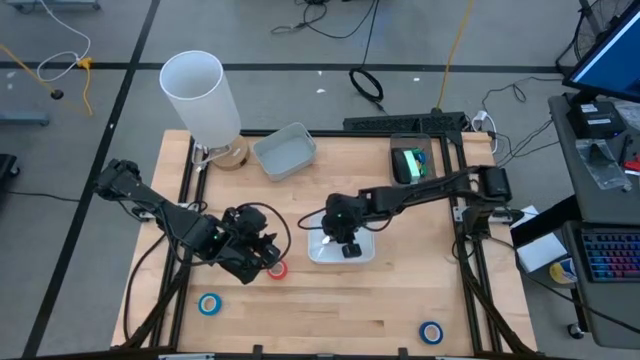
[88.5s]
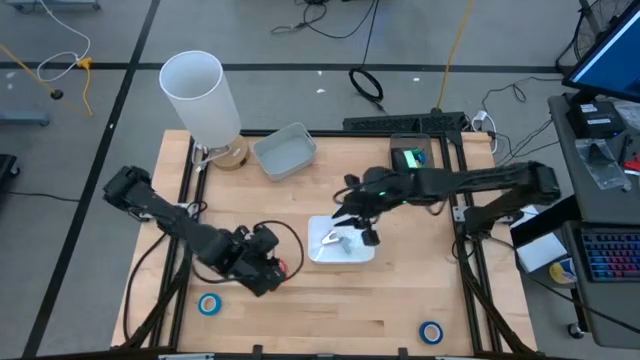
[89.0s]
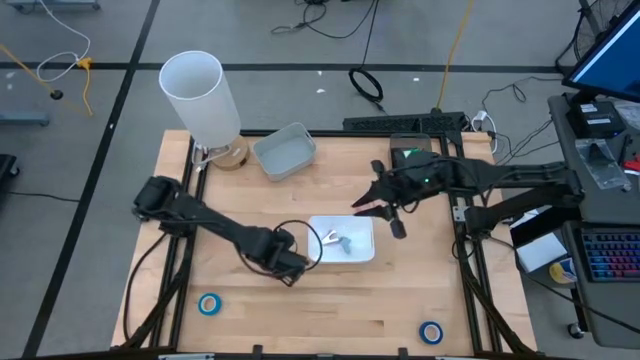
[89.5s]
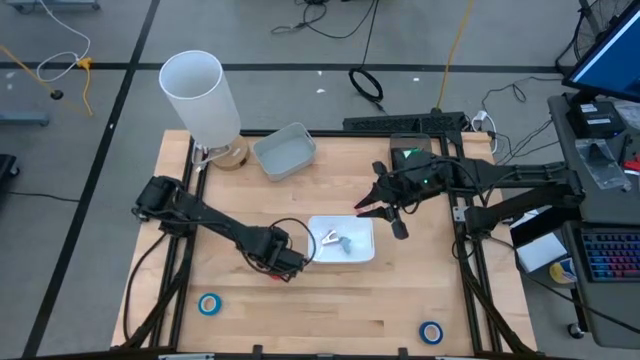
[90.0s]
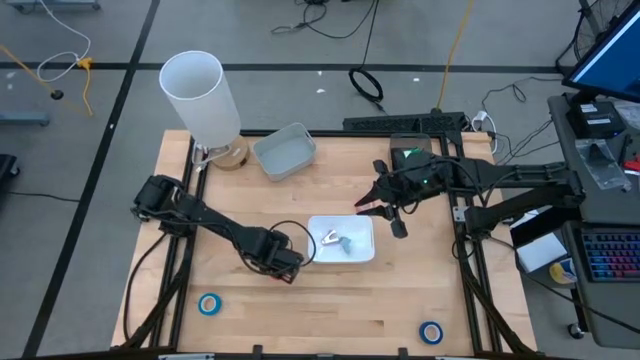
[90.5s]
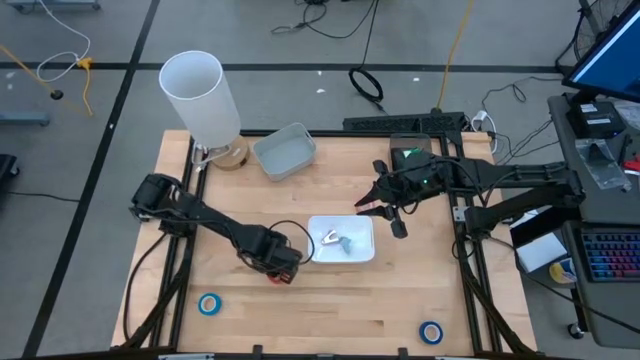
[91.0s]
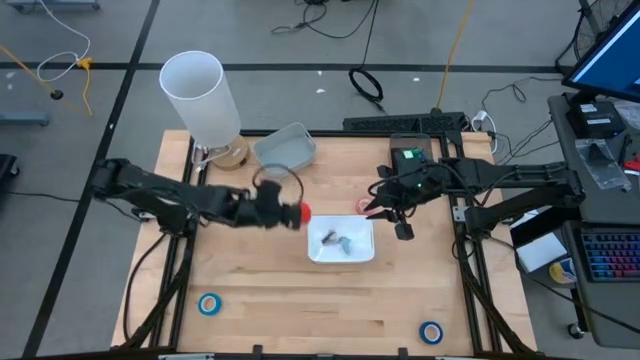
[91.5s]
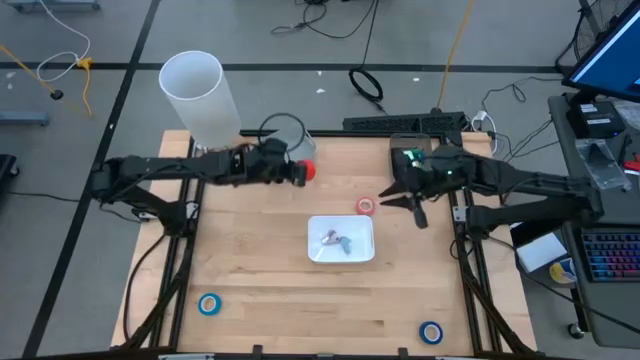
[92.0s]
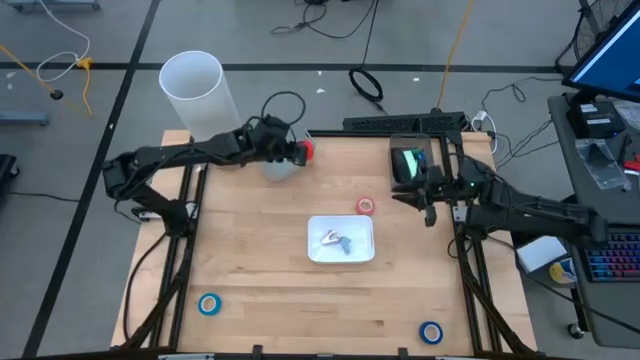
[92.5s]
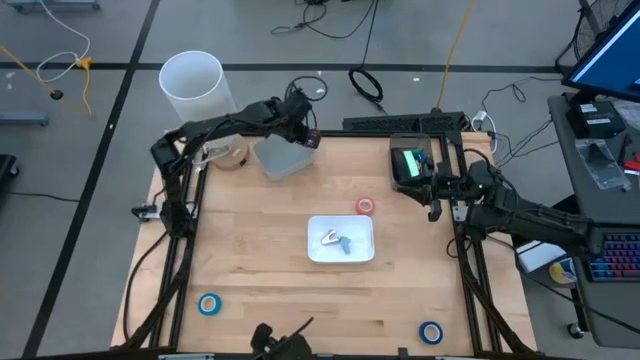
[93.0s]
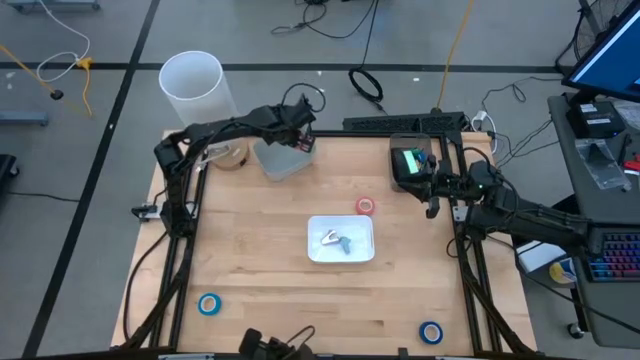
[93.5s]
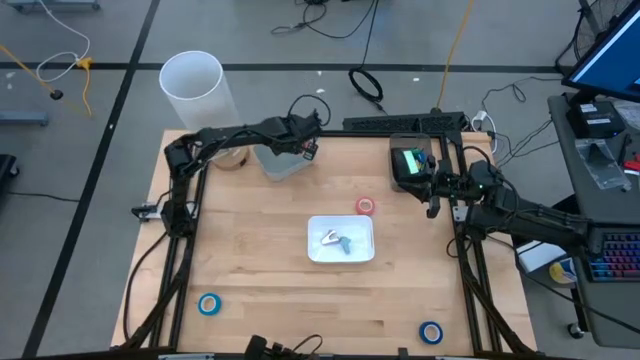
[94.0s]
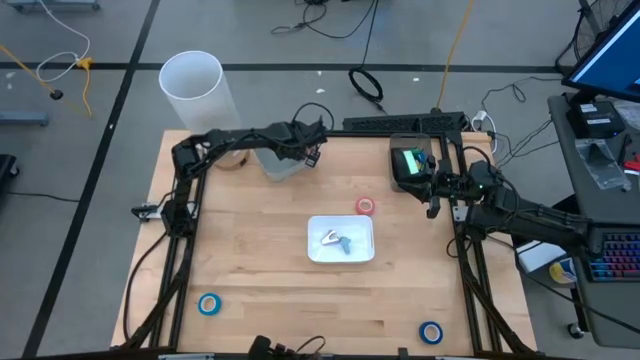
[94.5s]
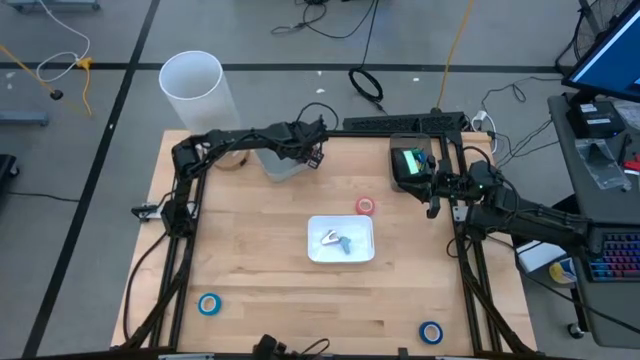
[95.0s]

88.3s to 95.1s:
Task: Pick and place Stapler, Stapler remover, tape
Put the orange tape into the gray bin

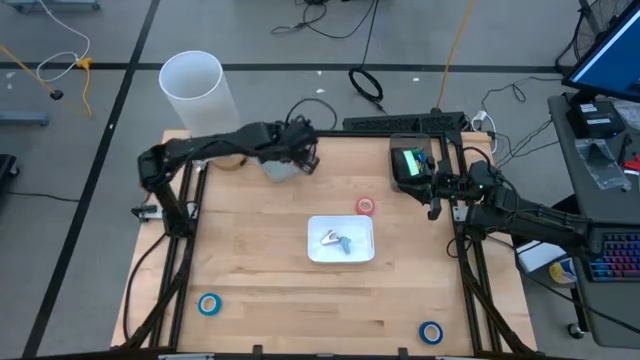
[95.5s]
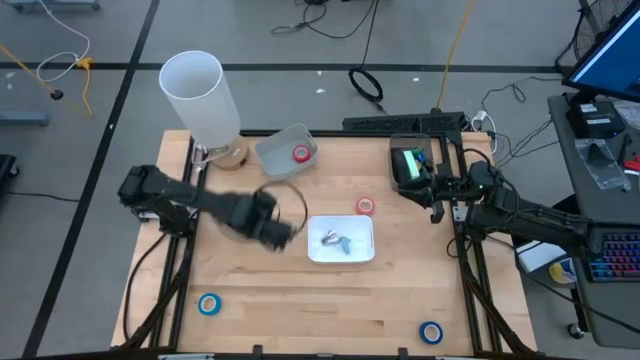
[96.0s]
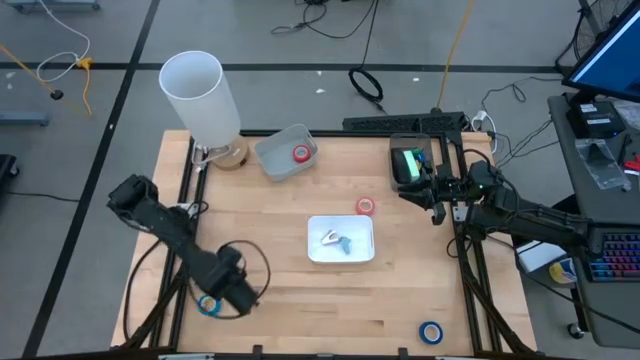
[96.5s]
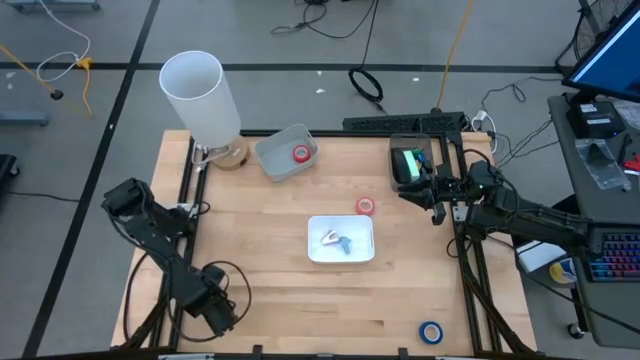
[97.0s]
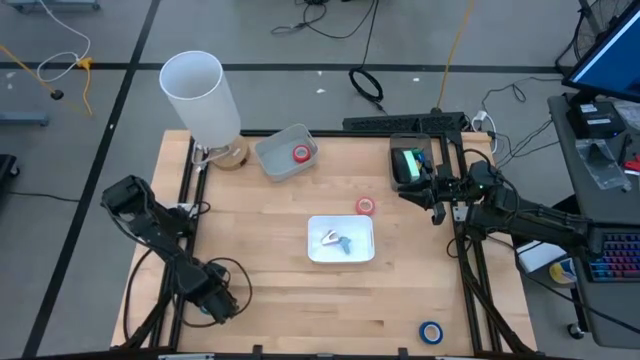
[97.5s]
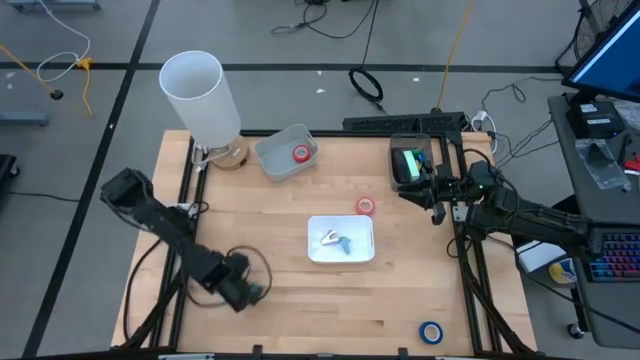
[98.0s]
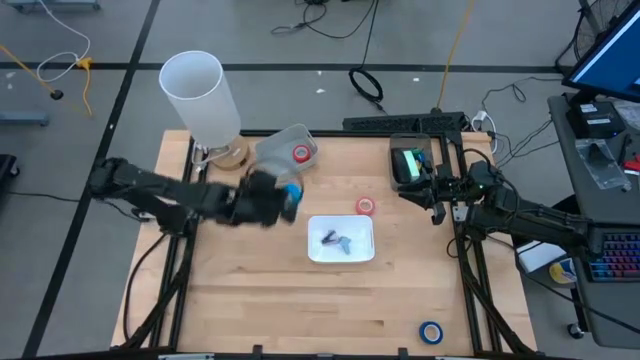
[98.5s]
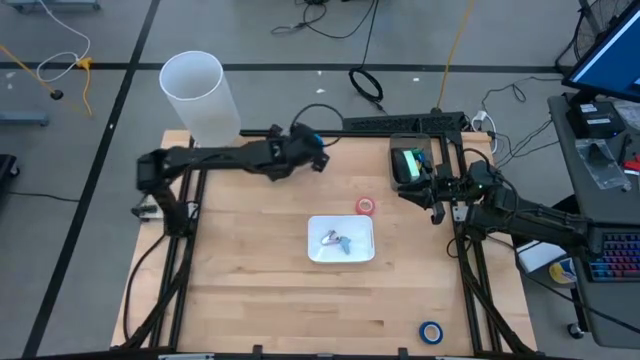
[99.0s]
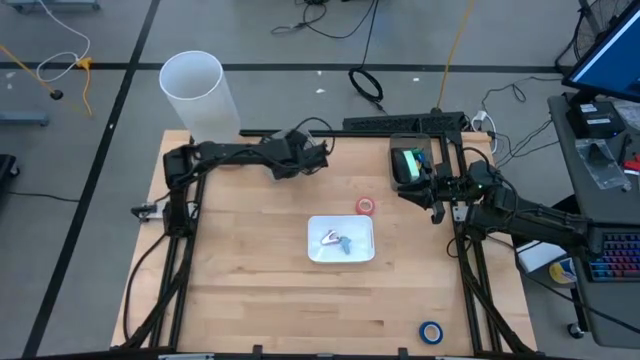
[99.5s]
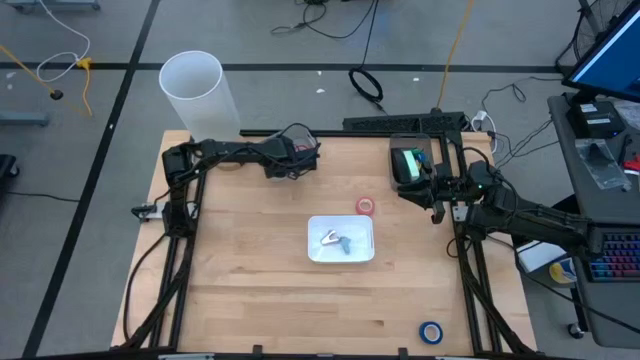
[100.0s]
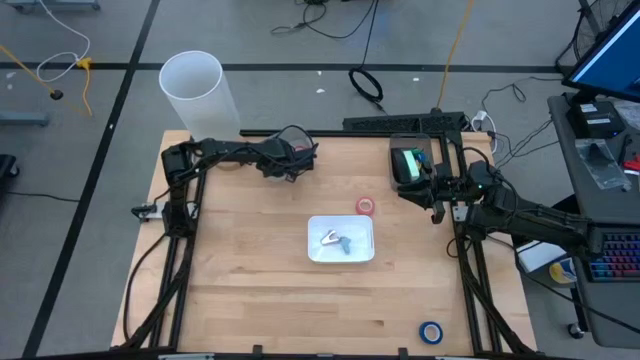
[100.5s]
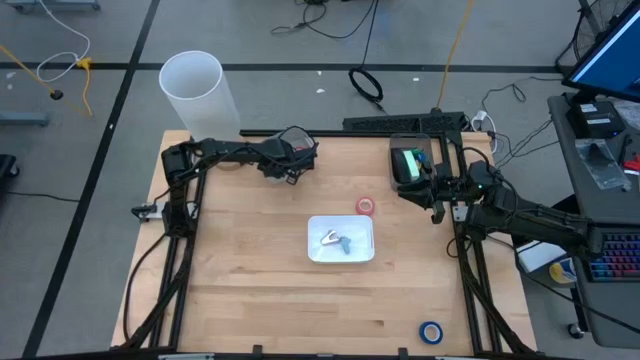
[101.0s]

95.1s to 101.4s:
Put the light blue tape into the gray bin

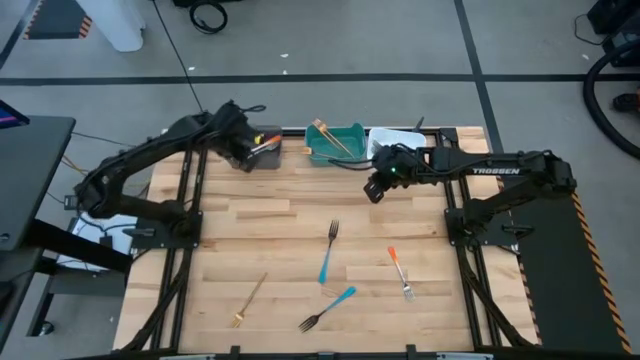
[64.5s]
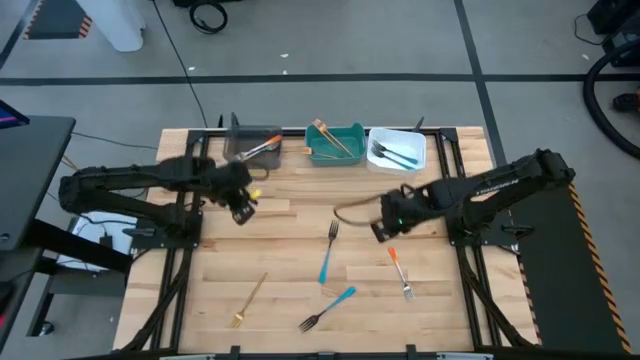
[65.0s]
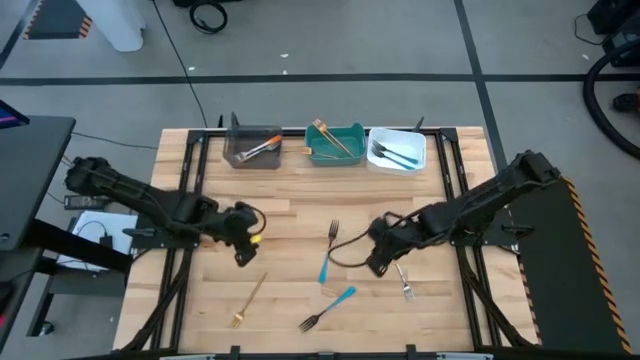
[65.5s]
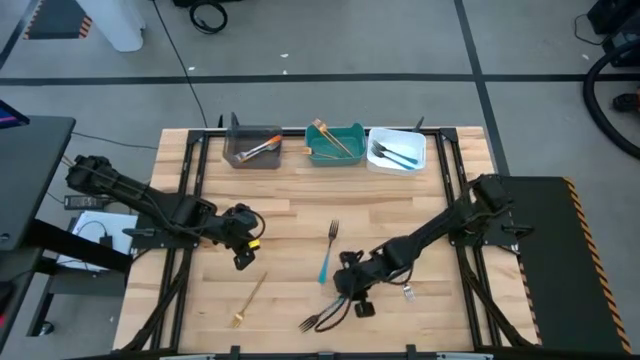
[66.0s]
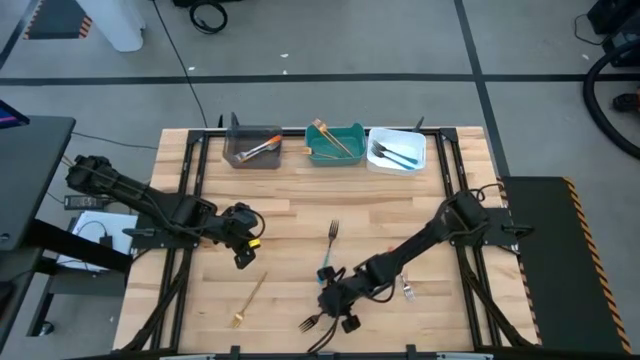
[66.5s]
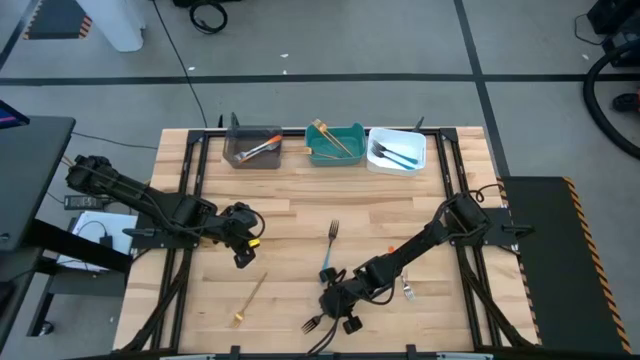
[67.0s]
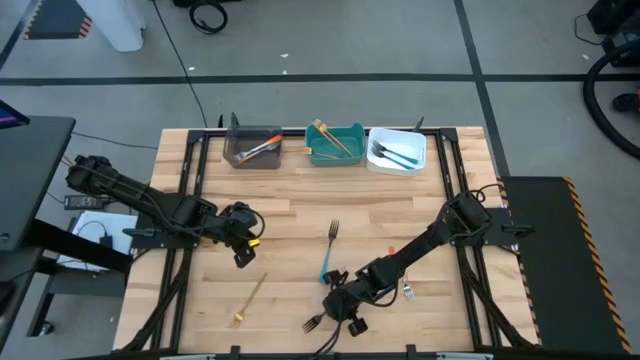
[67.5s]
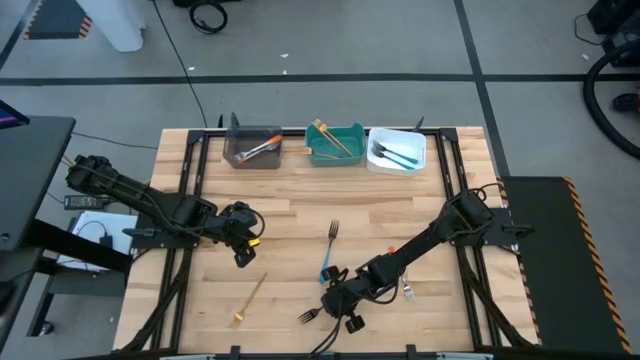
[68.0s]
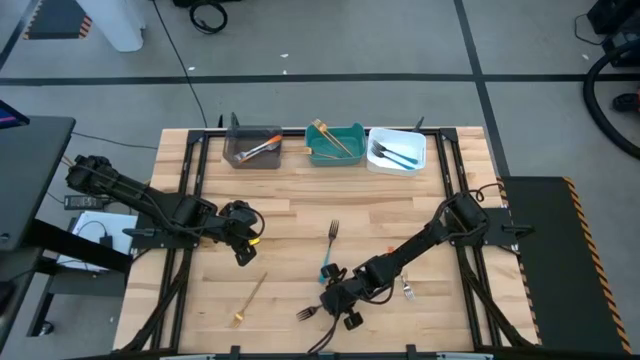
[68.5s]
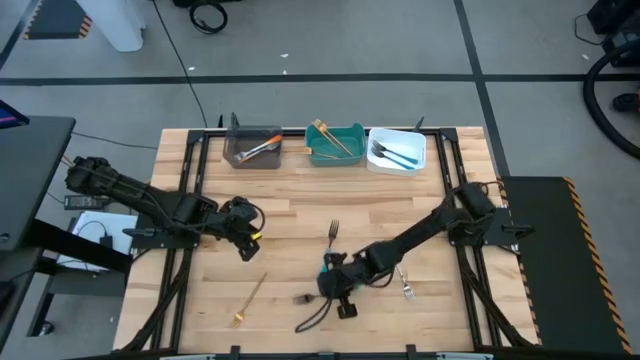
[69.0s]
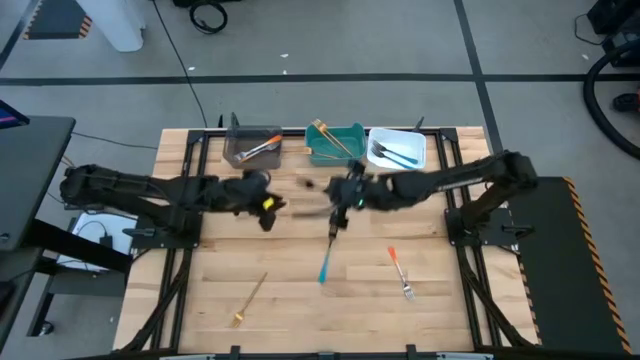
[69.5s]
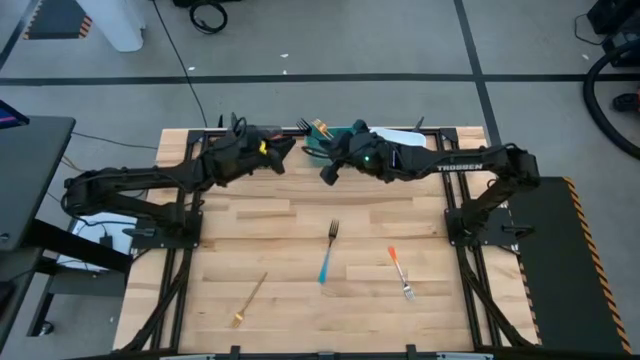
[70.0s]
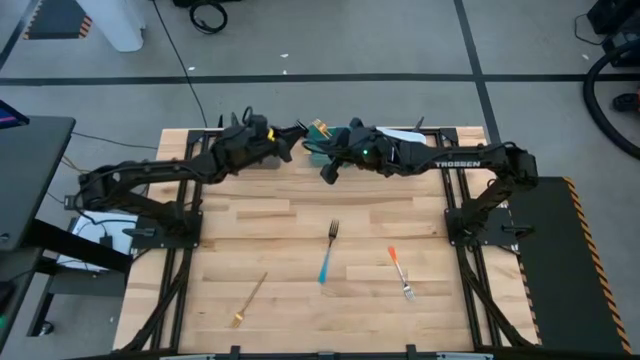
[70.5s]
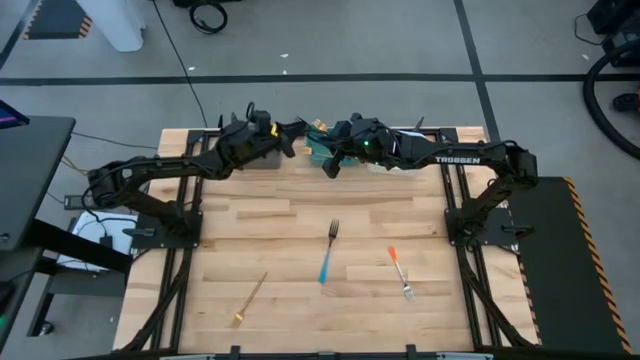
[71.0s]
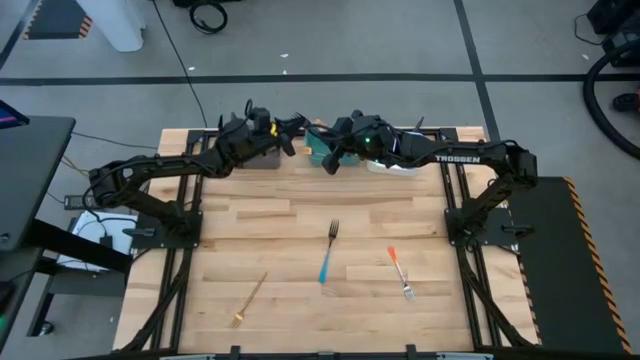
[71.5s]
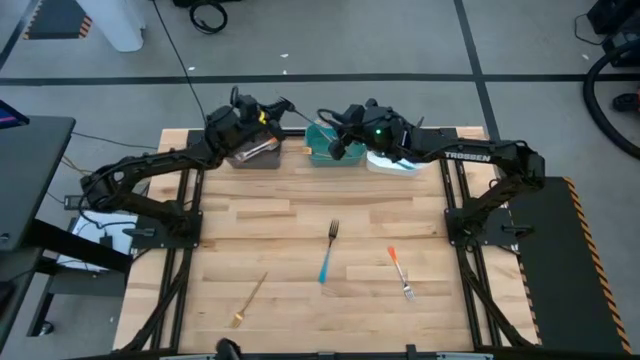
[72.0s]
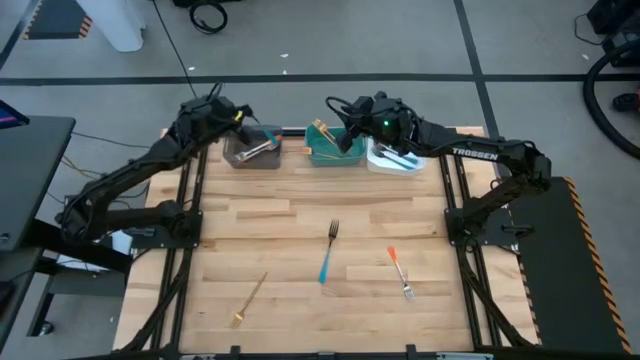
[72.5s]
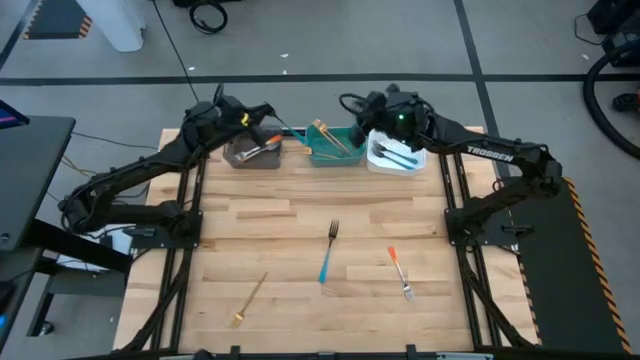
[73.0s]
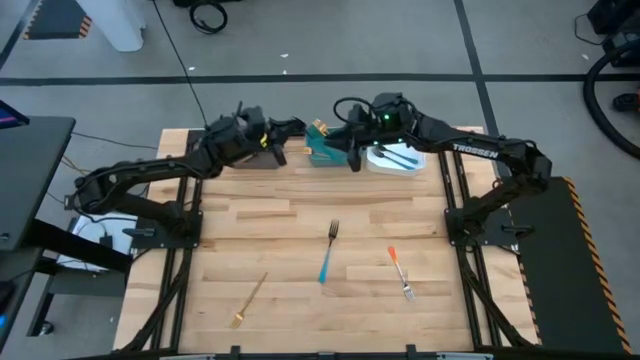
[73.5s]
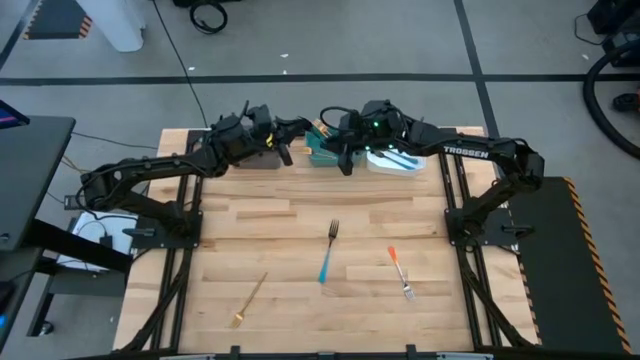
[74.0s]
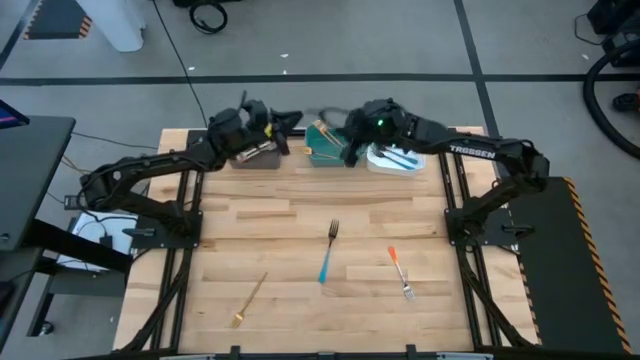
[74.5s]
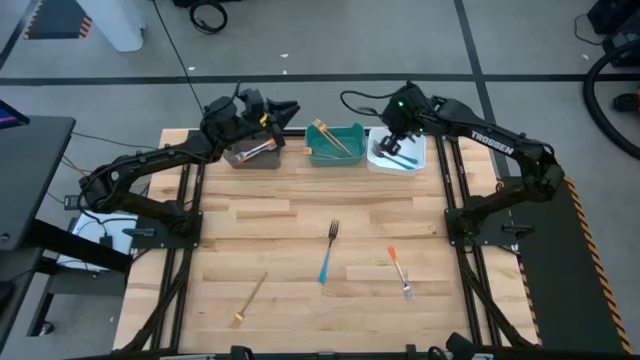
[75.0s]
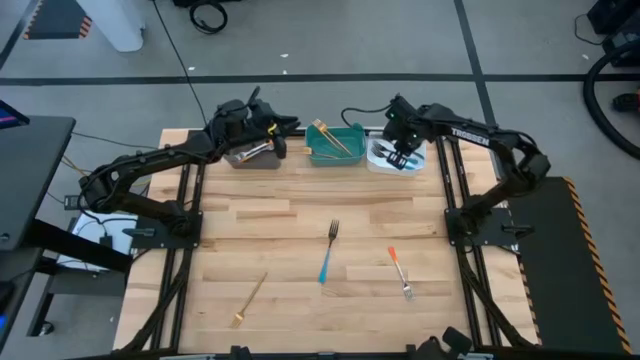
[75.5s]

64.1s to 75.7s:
Task: Sort silverware by color (type)
Put the bottom blue fork into the white bin
